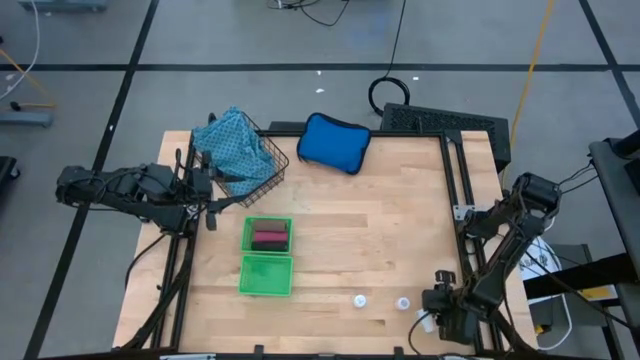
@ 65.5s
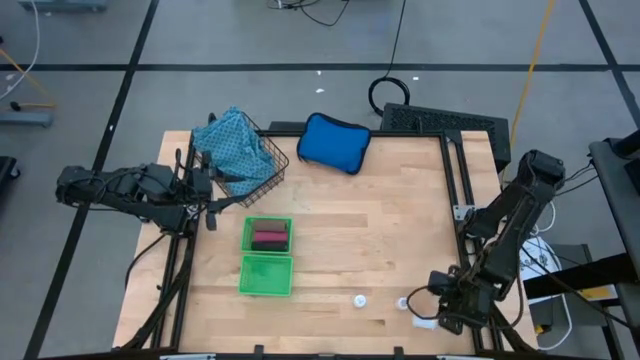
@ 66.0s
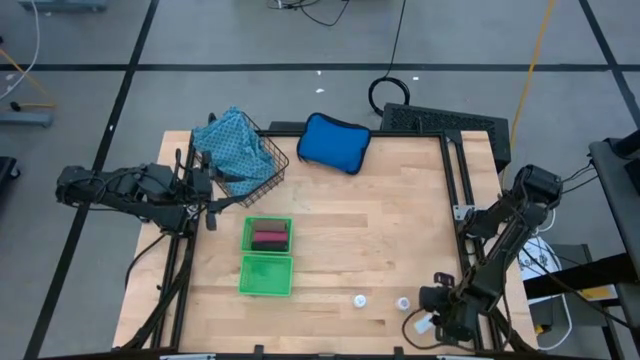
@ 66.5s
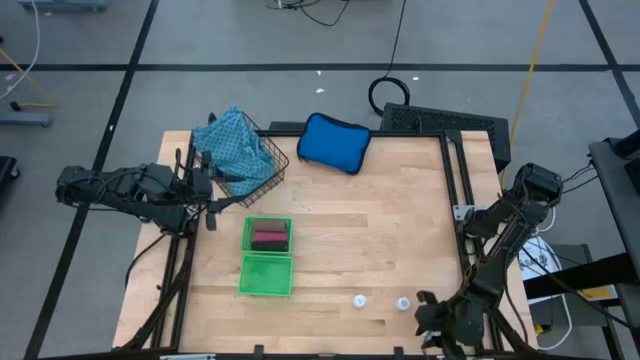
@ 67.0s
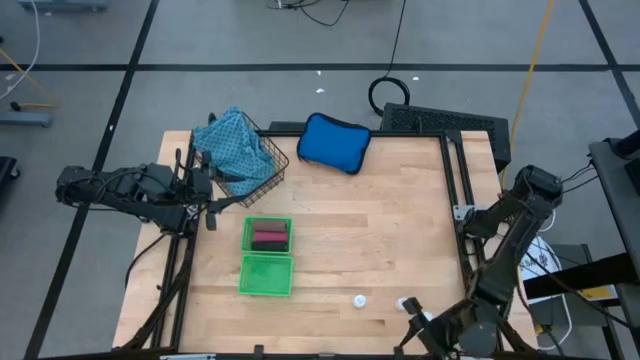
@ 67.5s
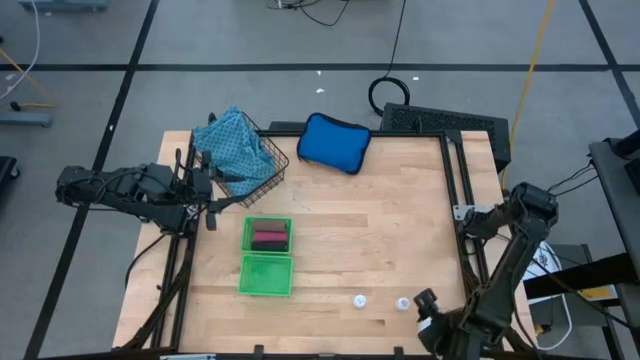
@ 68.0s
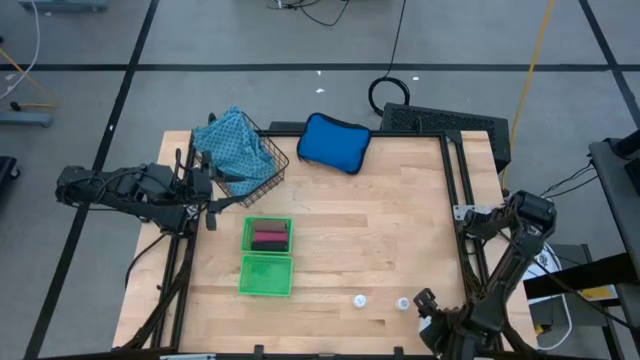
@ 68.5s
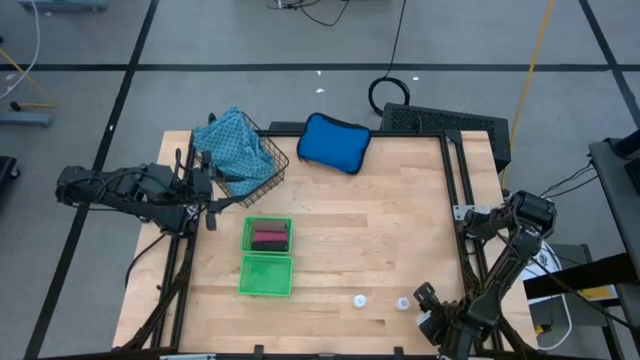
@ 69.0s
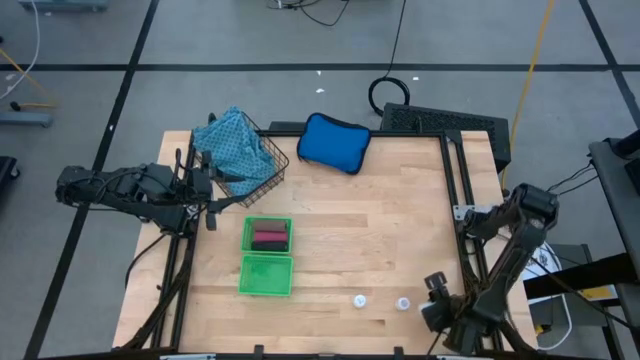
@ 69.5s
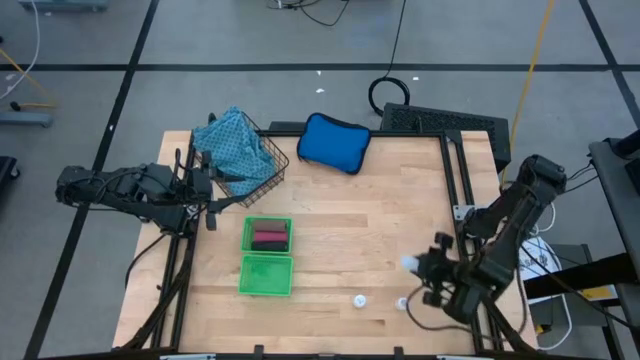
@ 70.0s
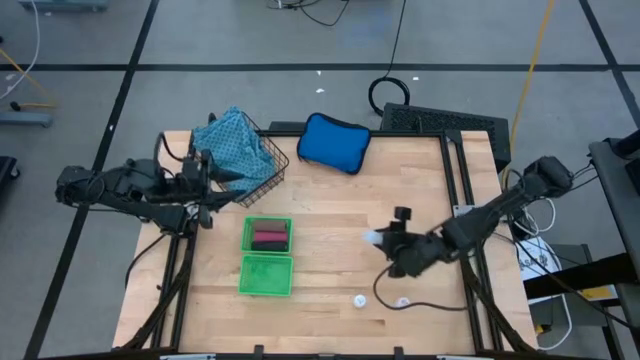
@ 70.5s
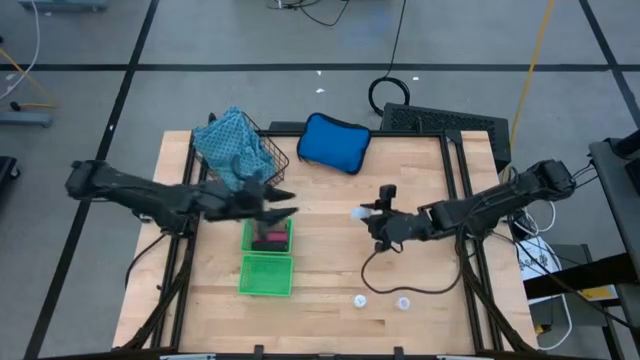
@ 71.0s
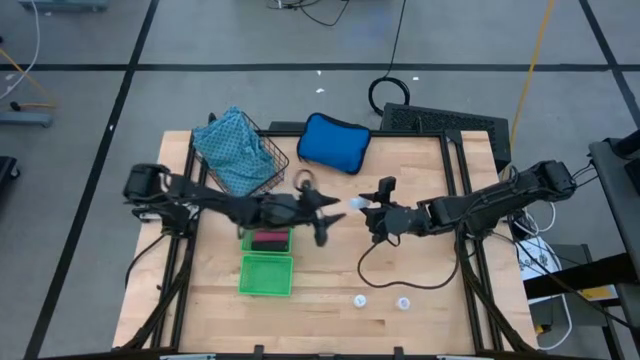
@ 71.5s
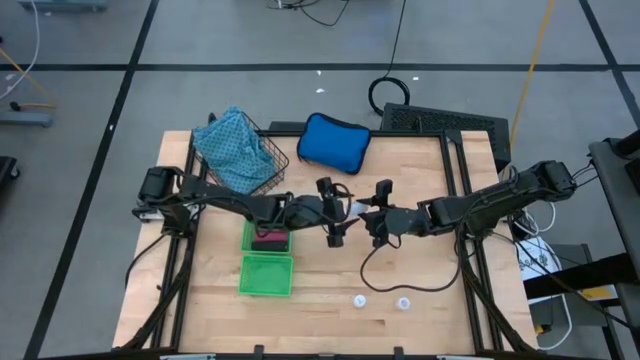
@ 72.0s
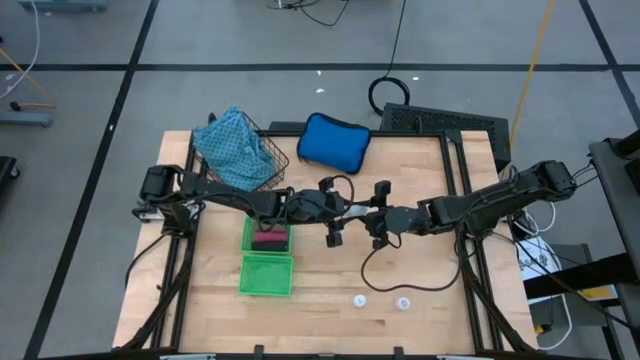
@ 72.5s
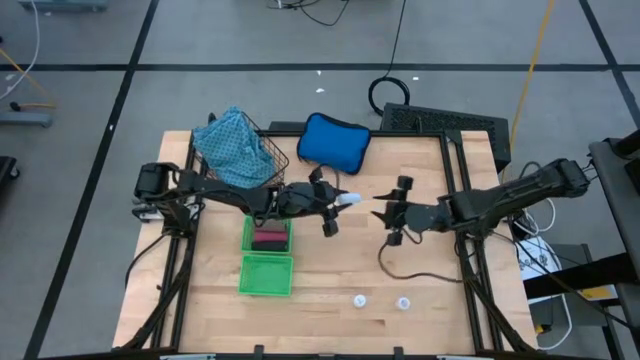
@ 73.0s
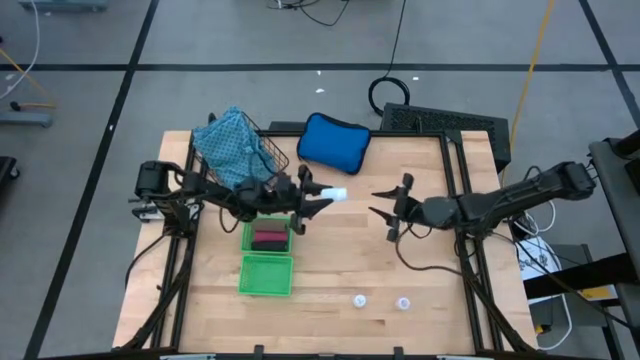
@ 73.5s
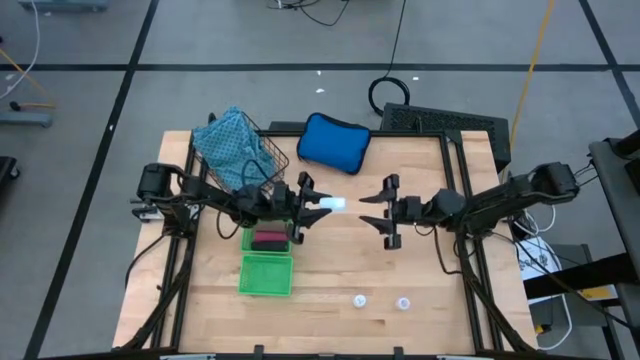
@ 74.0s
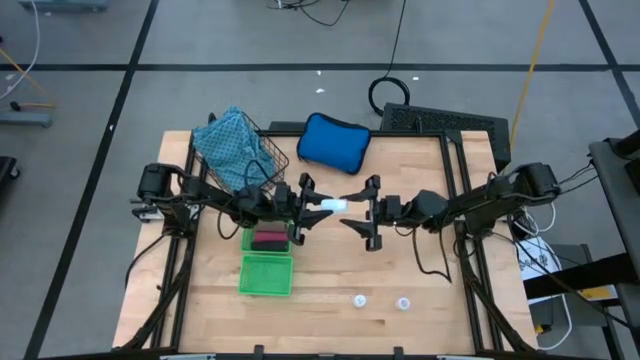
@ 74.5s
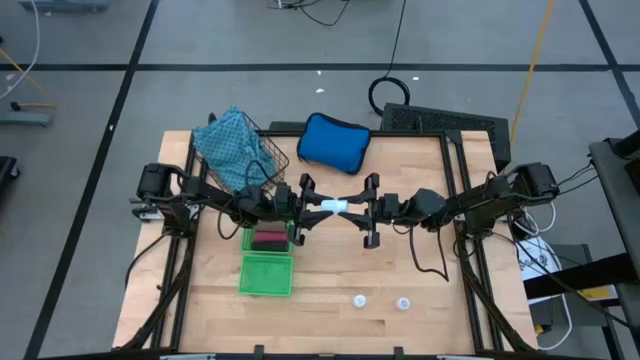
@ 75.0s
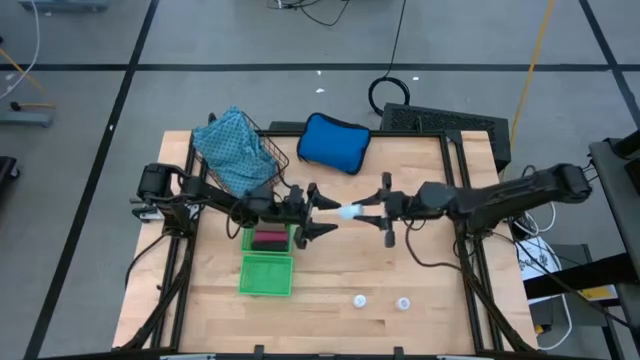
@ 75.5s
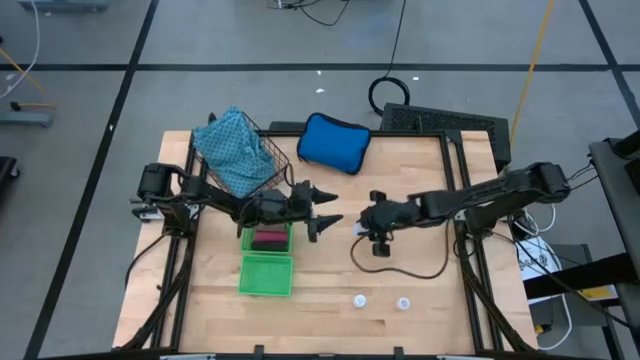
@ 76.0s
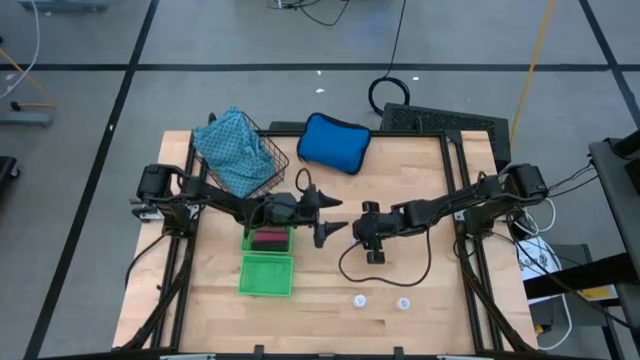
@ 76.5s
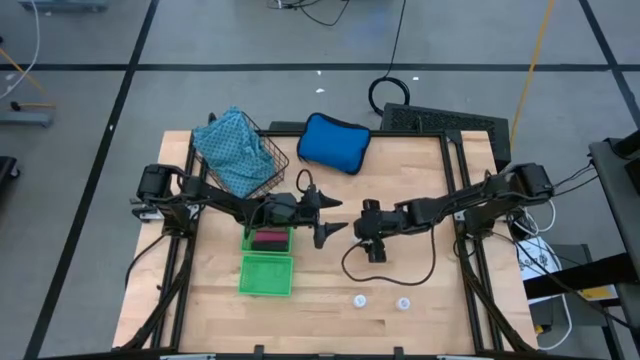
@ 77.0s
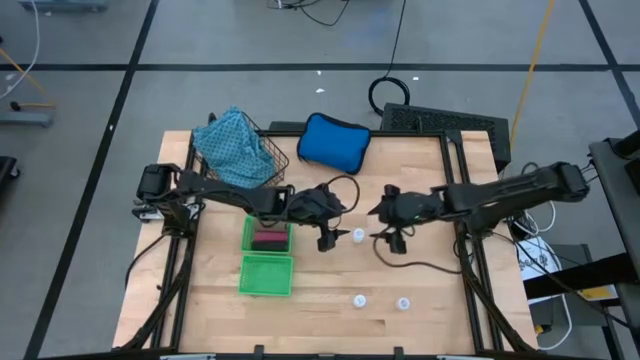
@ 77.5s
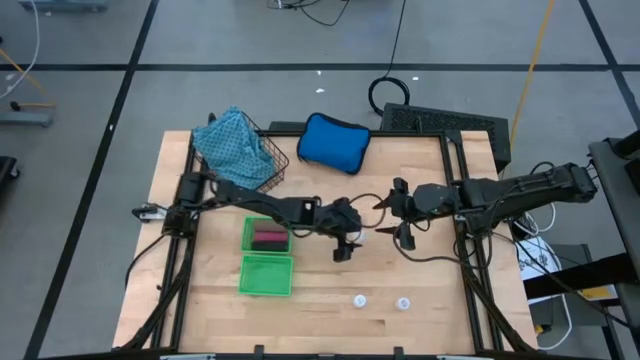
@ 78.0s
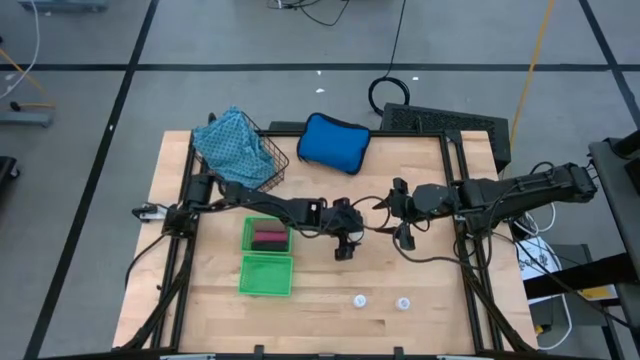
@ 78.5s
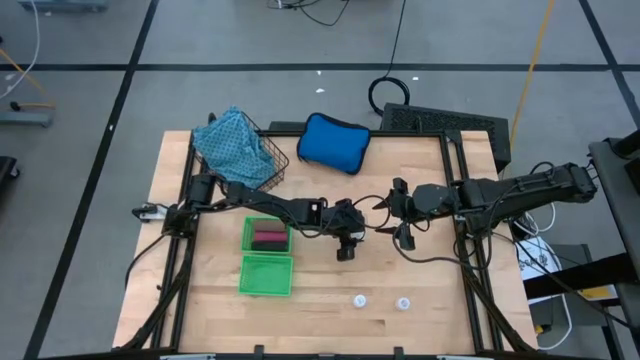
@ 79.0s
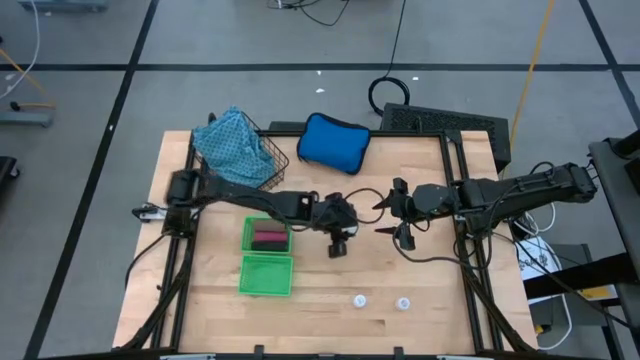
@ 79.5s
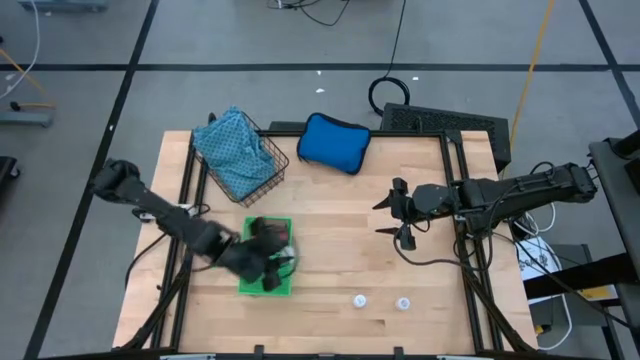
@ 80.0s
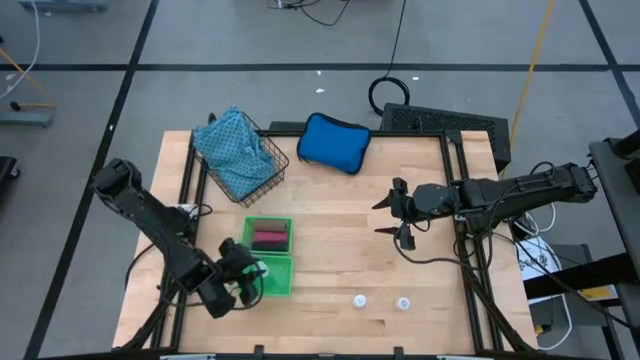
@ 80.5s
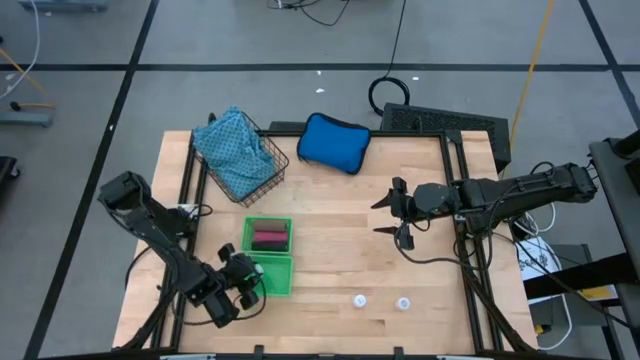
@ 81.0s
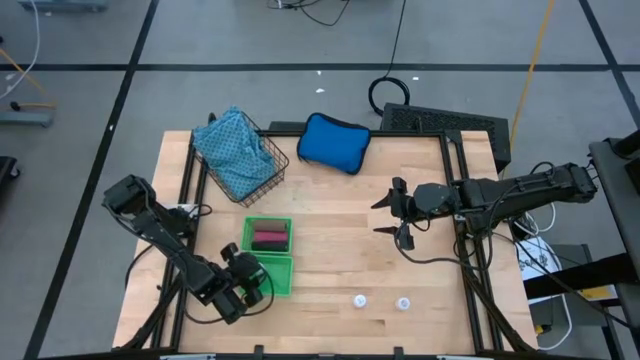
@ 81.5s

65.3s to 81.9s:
Task: Pick & Place Medicine items
Put the right white pill bottle into the bottom green basket
